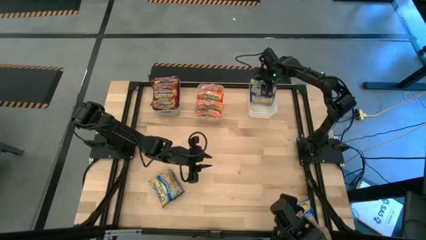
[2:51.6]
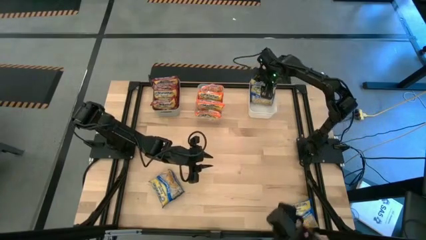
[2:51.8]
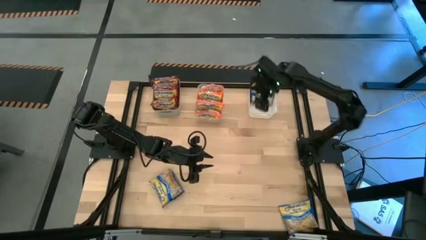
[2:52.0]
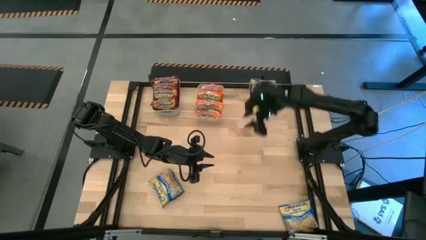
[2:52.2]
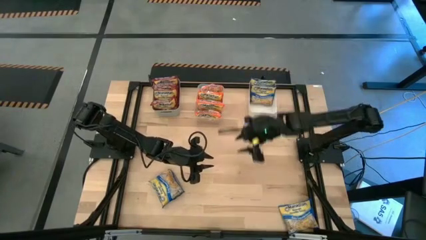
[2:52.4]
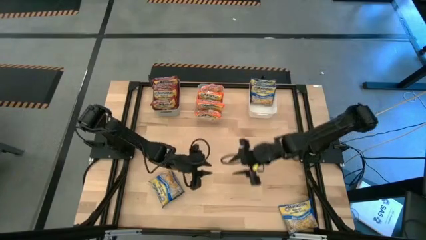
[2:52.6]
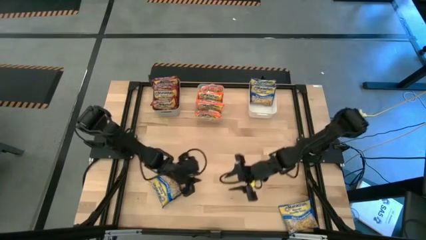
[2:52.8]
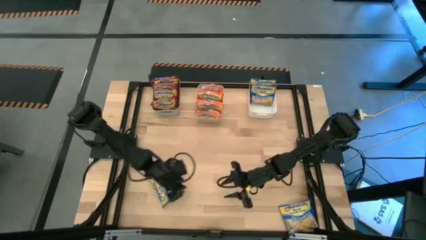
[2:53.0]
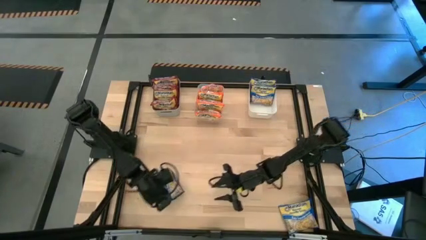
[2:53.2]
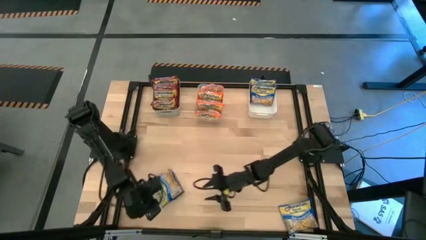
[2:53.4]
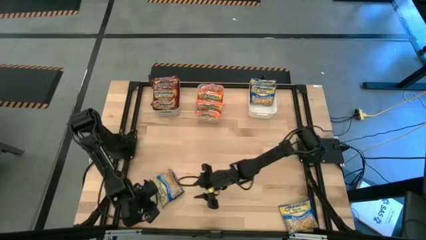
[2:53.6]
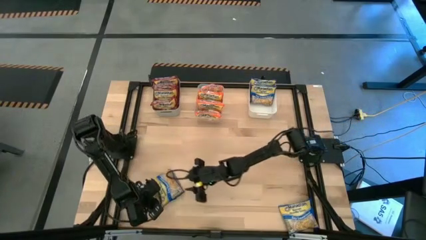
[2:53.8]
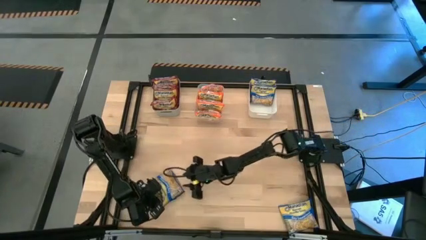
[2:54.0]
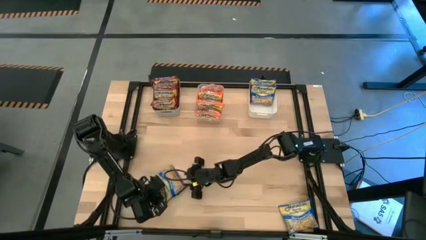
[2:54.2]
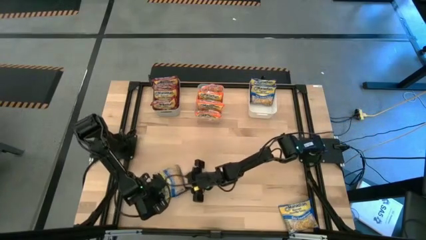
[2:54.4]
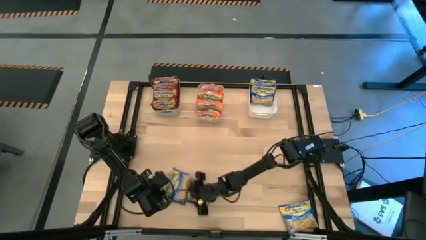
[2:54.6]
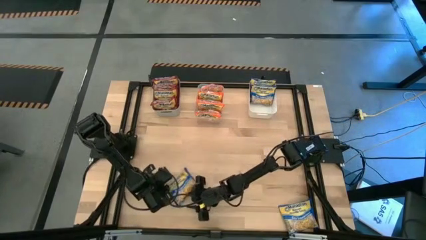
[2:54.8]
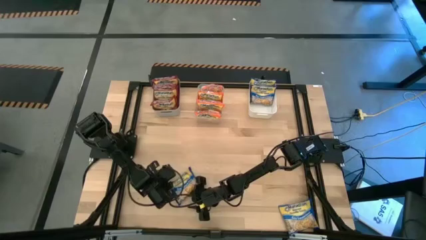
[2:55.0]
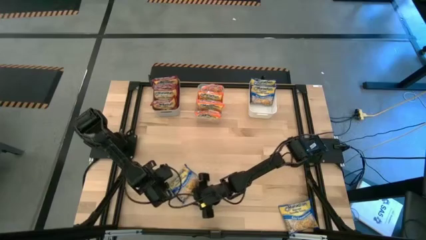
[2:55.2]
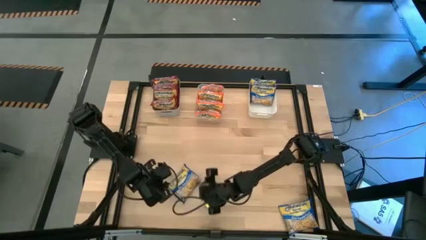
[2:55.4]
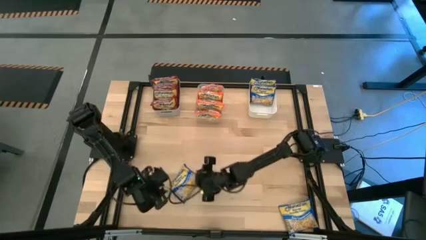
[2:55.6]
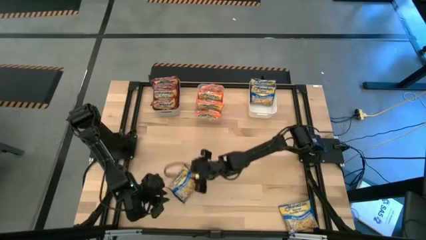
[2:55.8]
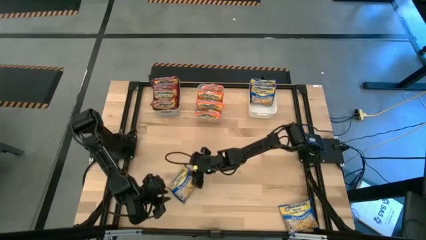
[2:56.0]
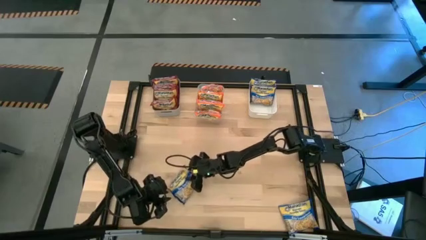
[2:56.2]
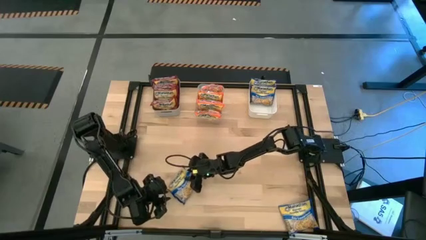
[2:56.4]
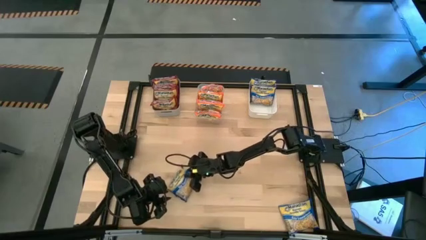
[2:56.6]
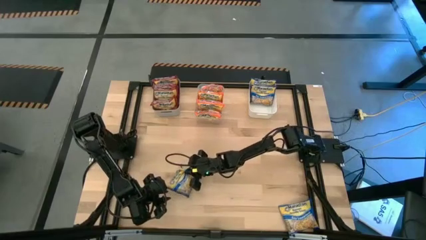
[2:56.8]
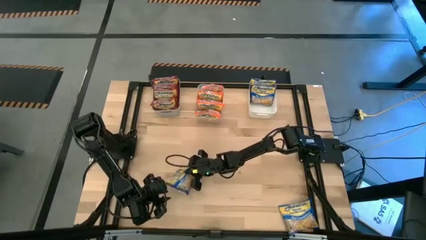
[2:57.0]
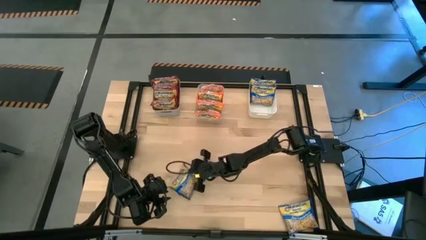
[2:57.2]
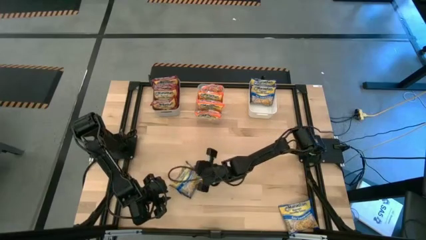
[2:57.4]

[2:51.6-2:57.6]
Task: Sort Maruchan noodles
Put the left blue noodle into the white bin

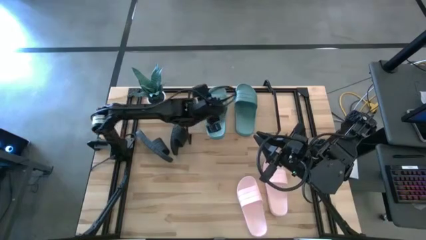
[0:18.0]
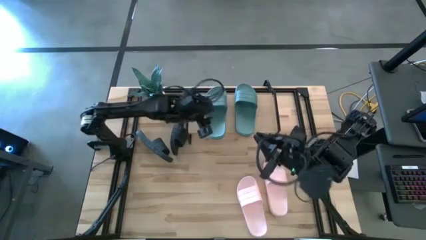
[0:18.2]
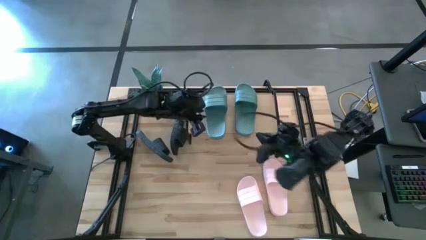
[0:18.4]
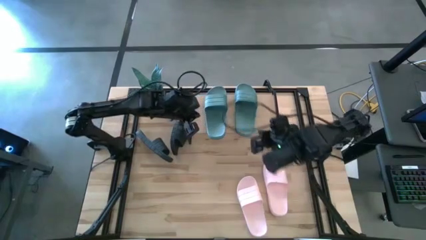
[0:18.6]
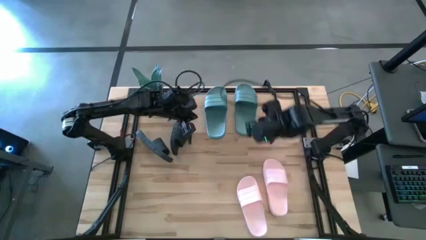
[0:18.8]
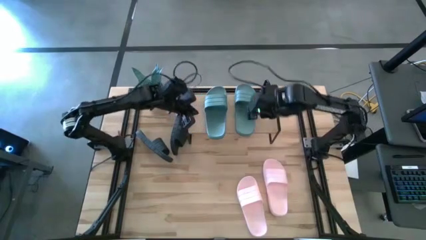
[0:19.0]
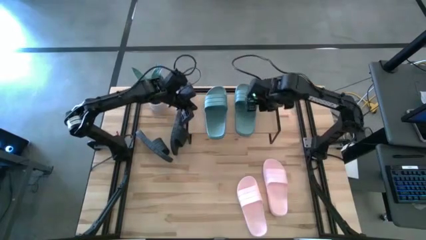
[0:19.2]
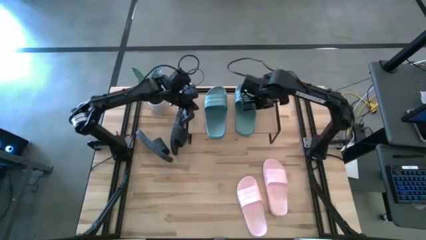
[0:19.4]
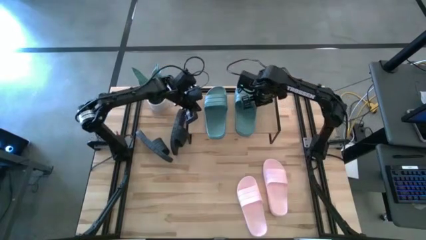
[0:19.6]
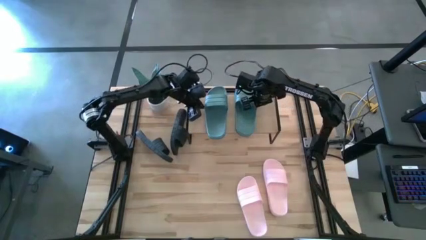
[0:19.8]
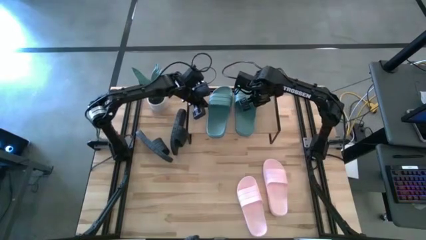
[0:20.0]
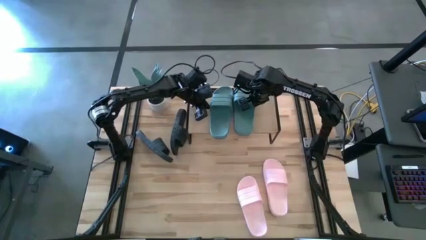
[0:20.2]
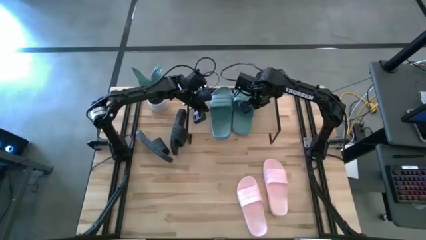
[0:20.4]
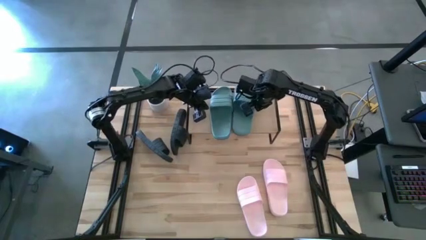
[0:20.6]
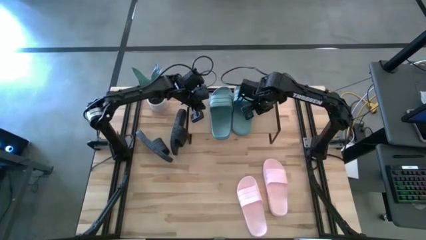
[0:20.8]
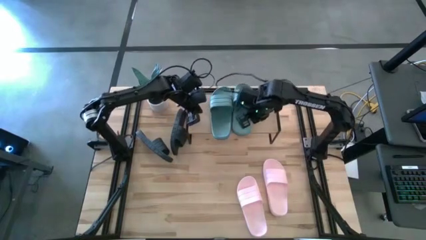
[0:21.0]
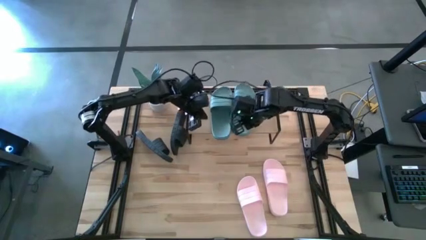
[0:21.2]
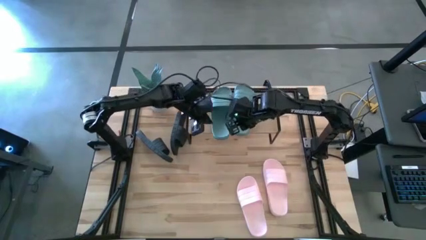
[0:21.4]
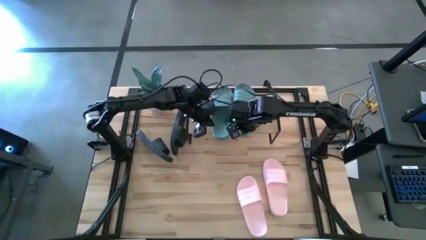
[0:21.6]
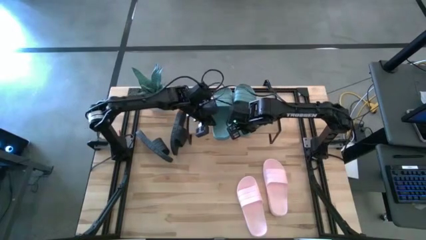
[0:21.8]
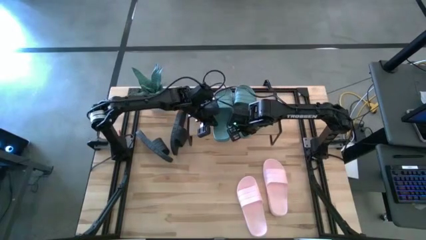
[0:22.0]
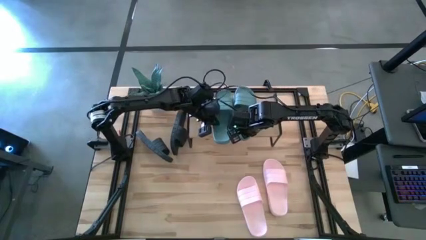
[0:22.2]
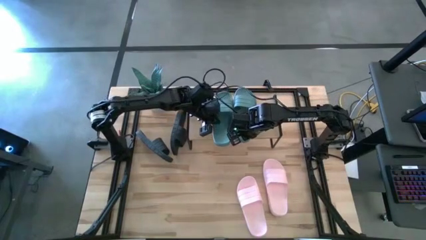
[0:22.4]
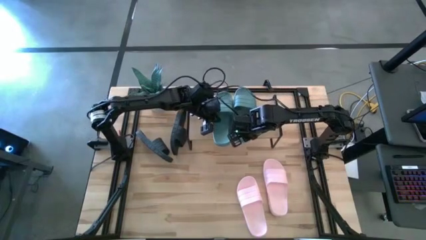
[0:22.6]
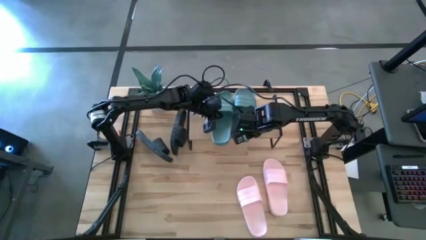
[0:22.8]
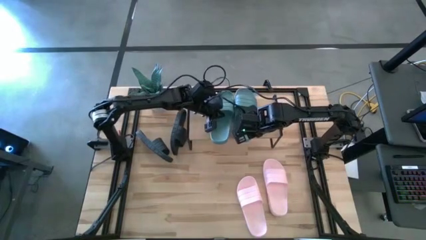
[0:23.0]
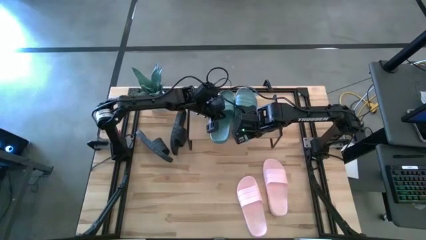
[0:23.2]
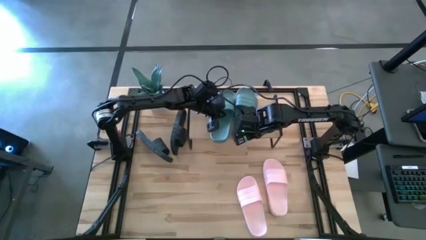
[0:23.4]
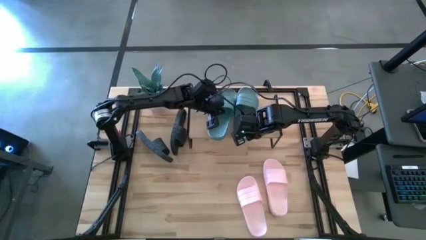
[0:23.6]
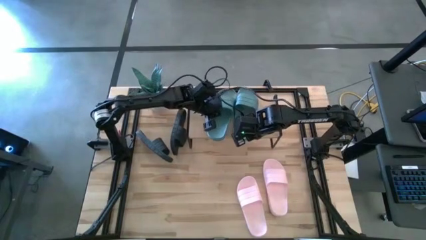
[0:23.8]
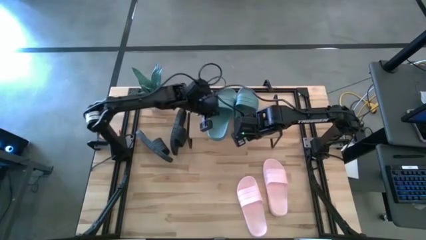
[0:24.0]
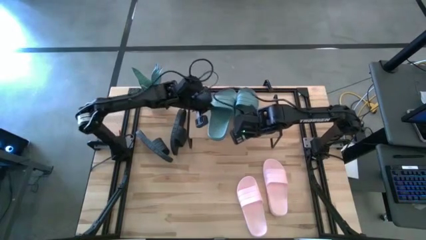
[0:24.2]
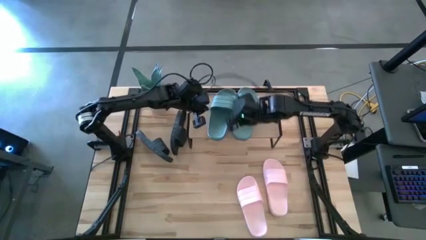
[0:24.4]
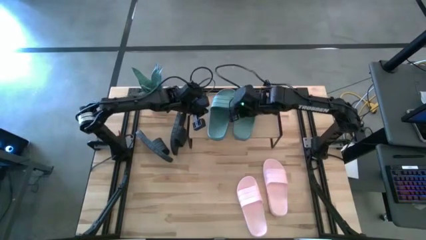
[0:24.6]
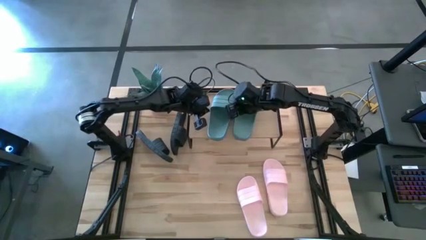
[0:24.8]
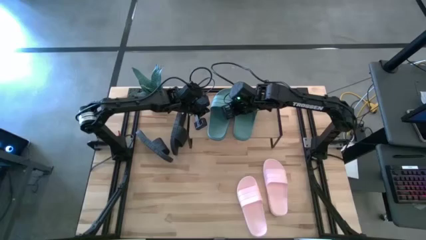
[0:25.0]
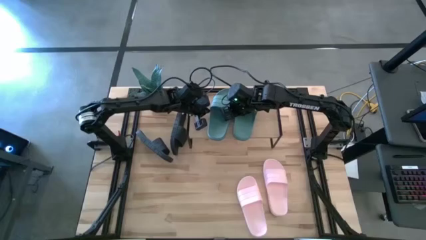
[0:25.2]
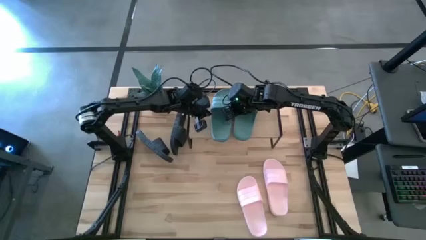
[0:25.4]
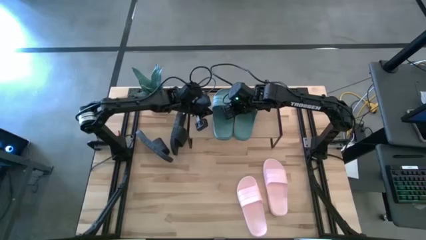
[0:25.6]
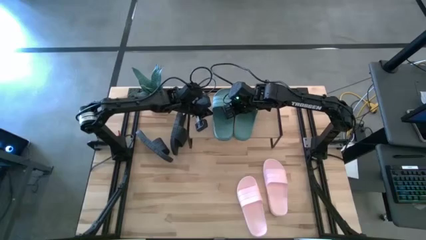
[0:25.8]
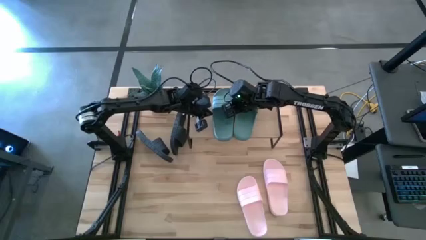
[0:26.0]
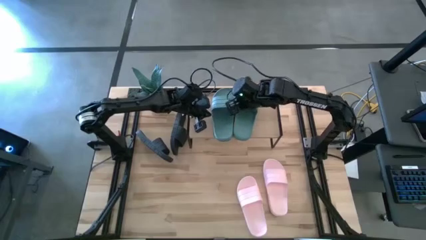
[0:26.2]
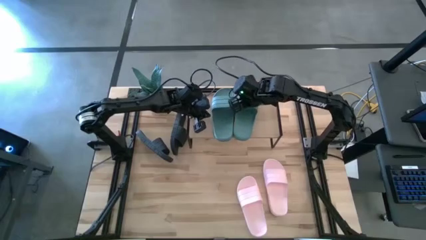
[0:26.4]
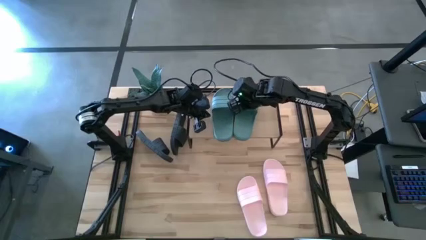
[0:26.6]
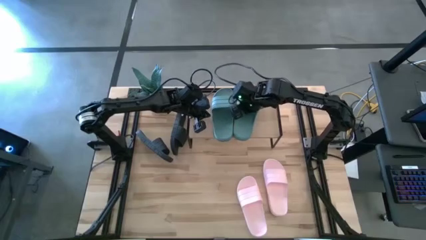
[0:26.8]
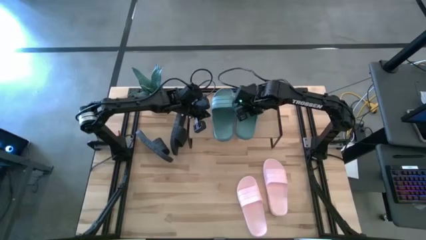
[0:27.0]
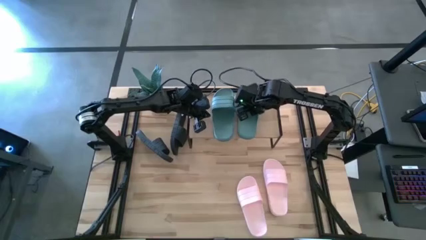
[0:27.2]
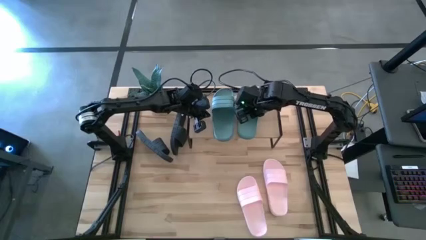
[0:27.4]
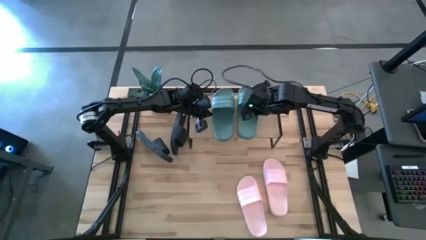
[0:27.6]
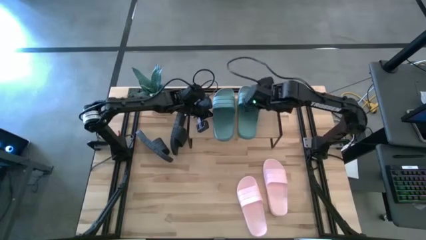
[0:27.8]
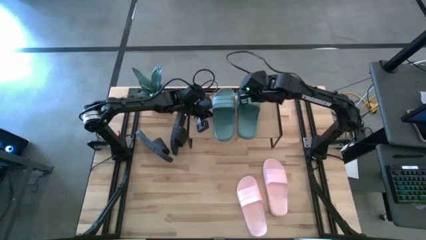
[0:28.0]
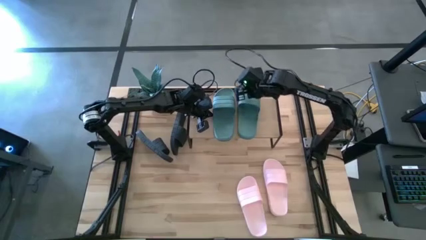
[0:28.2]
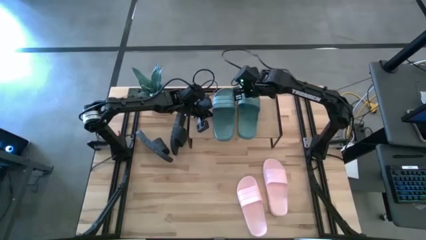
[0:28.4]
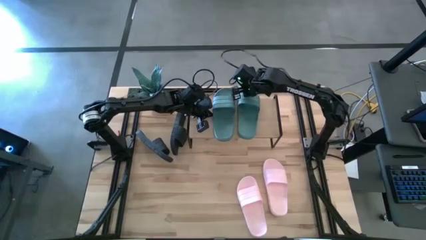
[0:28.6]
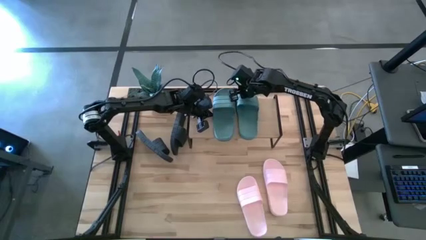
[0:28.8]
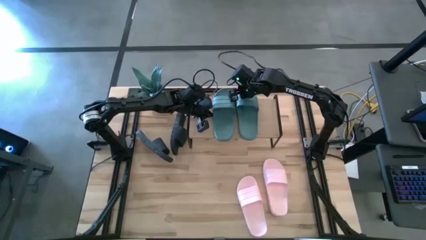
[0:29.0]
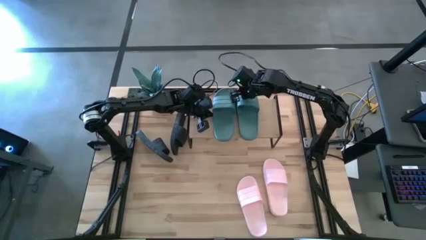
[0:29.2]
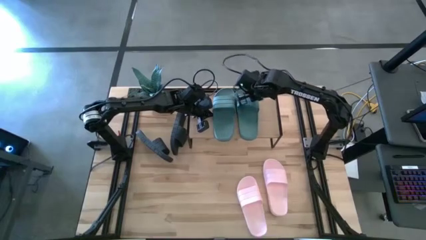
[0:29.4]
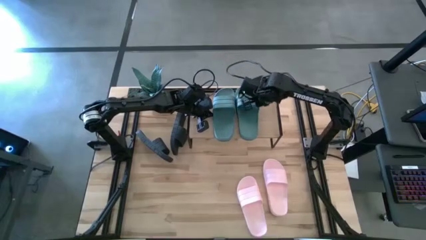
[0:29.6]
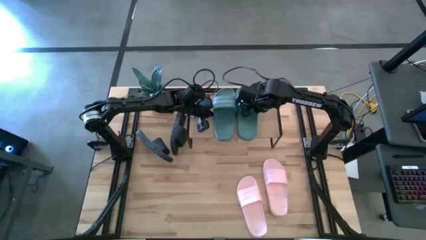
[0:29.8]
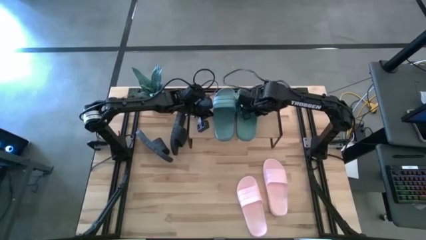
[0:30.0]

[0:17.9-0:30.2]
Task: Pick and place slides into the shelf
Adjust the green slippers on the shelf
